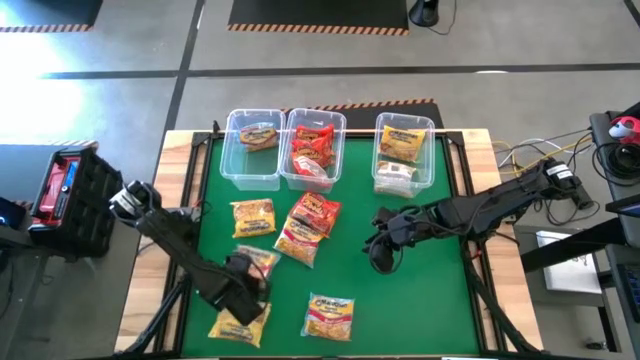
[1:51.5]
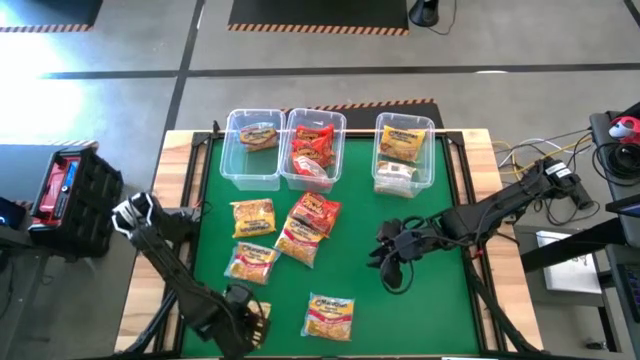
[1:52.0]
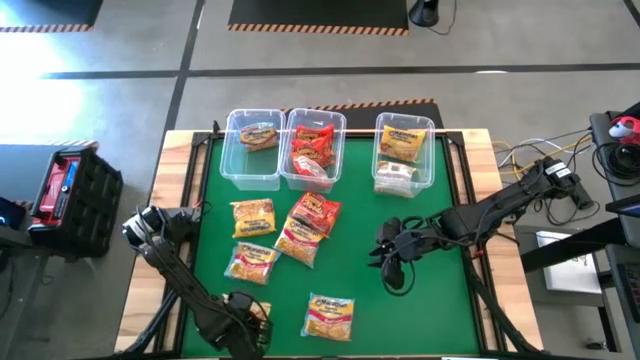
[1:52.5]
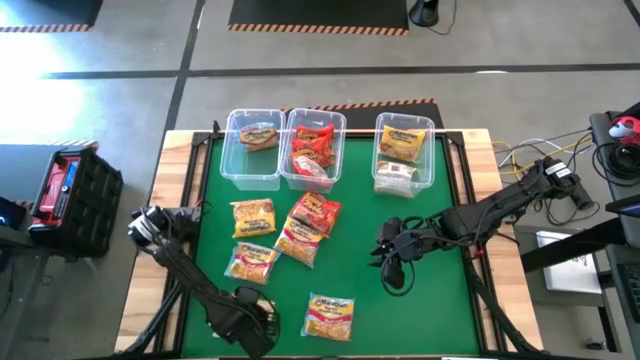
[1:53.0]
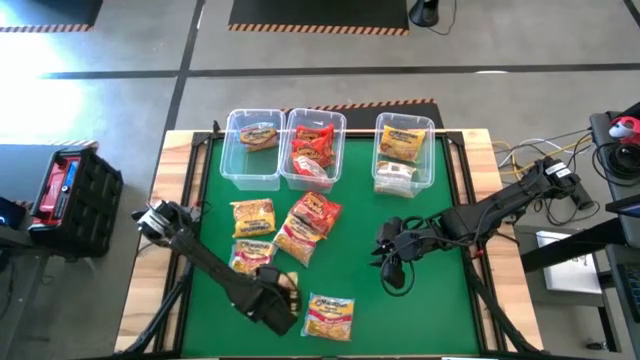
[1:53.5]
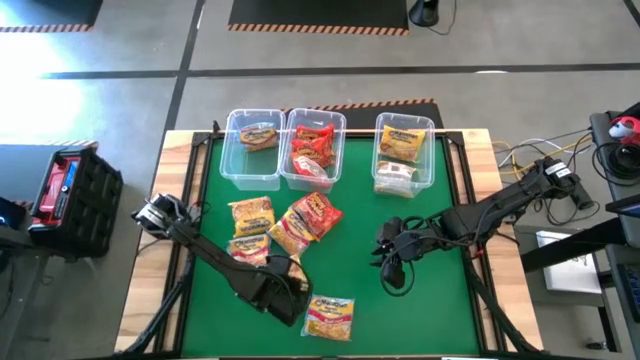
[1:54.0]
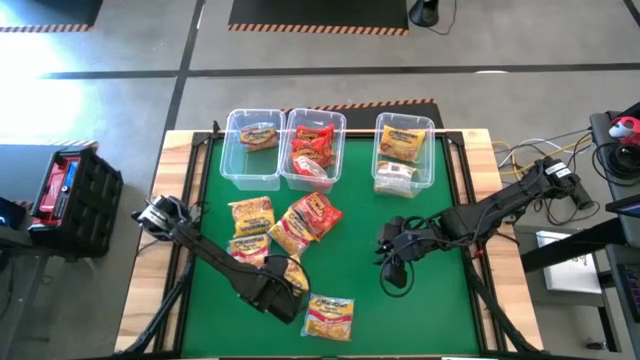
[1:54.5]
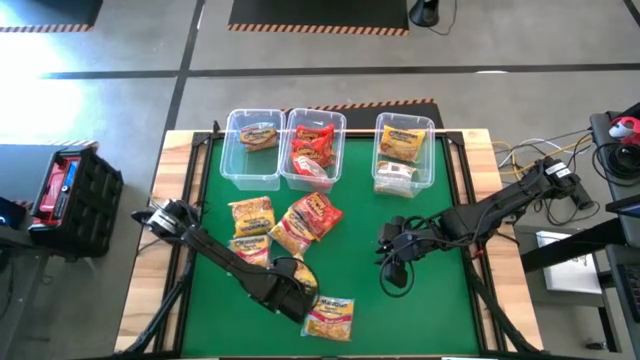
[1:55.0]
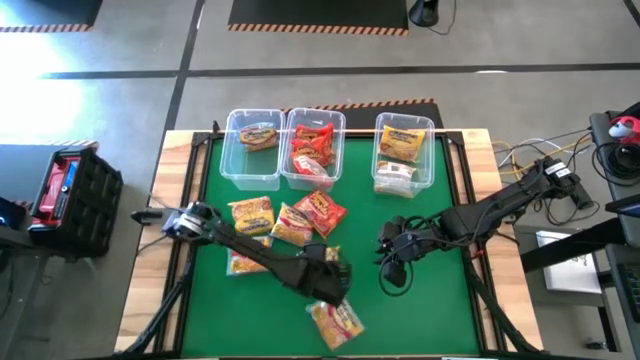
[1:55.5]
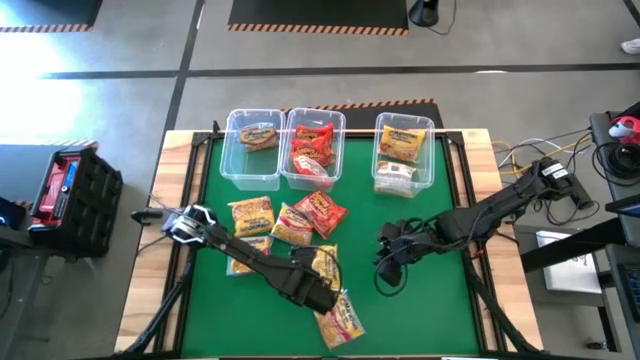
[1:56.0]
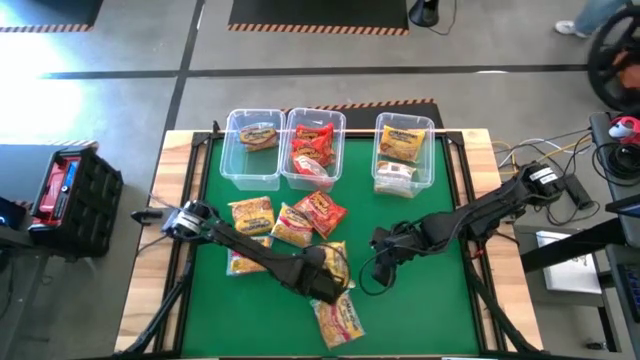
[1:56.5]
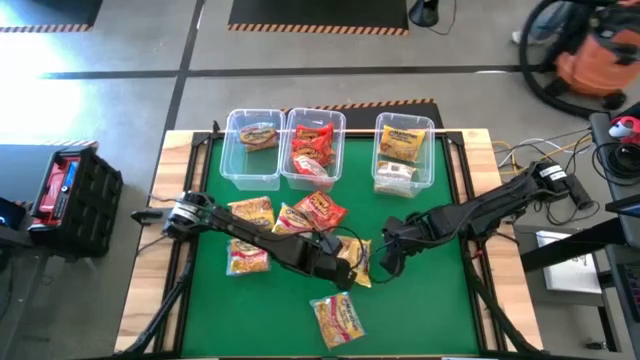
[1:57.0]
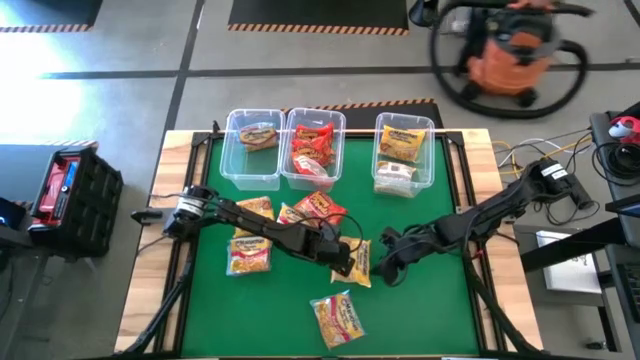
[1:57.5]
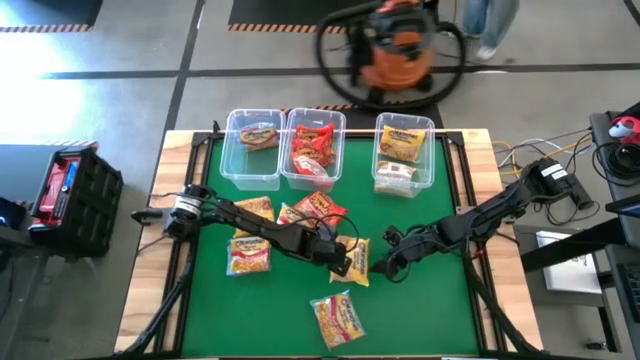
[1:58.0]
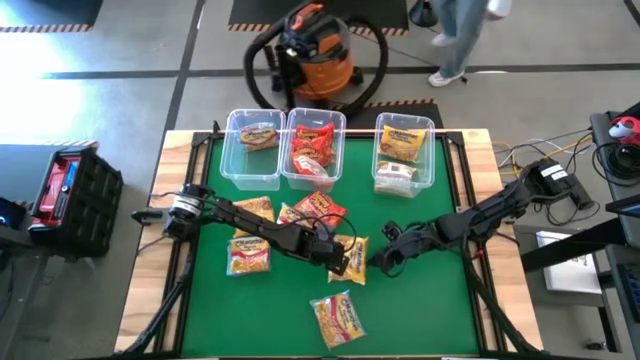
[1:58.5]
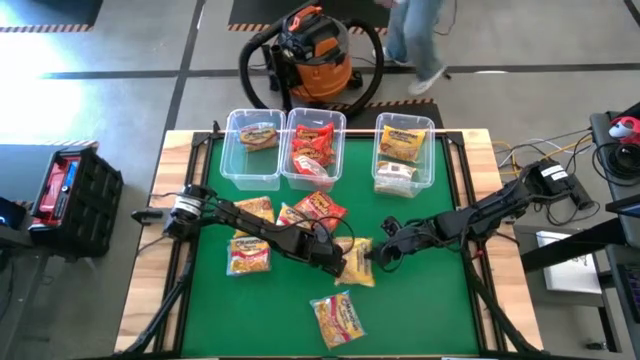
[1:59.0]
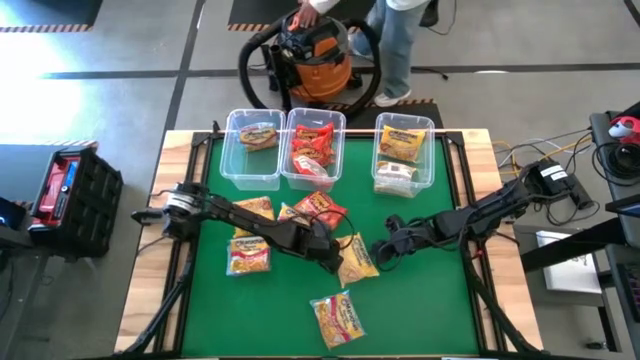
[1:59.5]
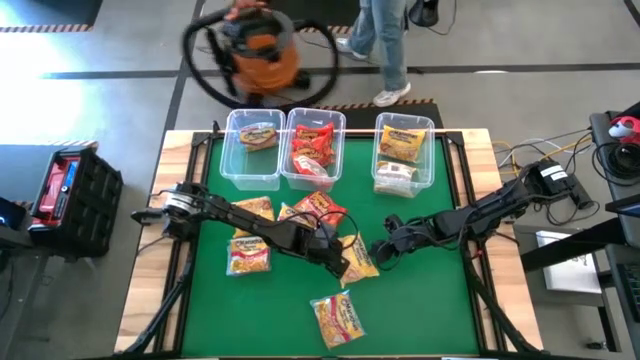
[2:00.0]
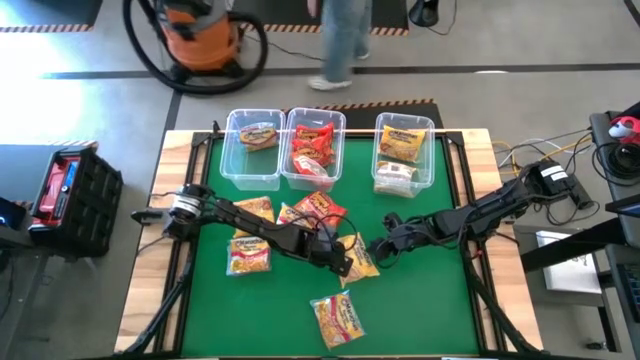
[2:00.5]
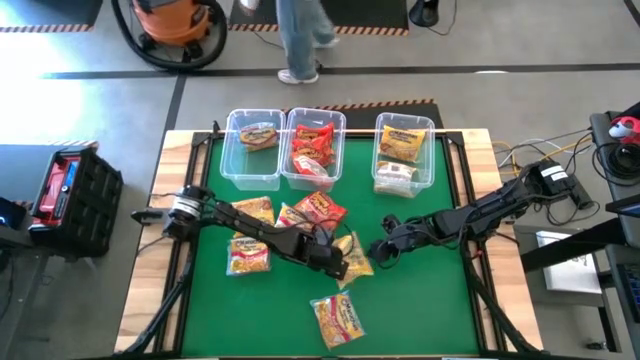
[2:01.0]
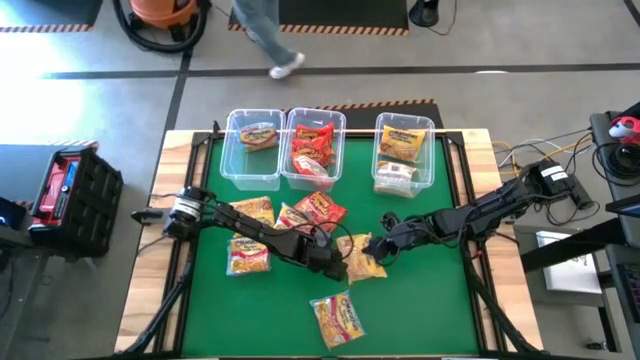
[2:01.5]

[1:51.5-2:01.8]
Task: Sort Maruchan noodles
Put the bottom yellow noodle pack into the top right transparent bin

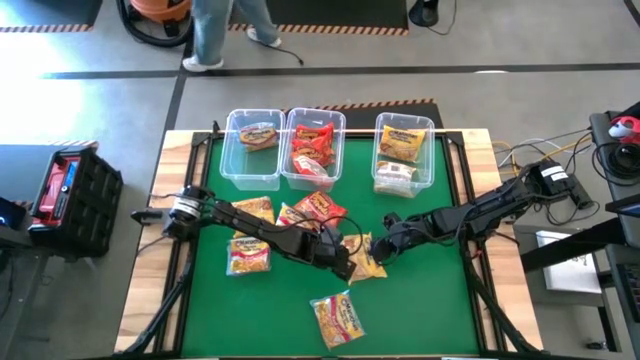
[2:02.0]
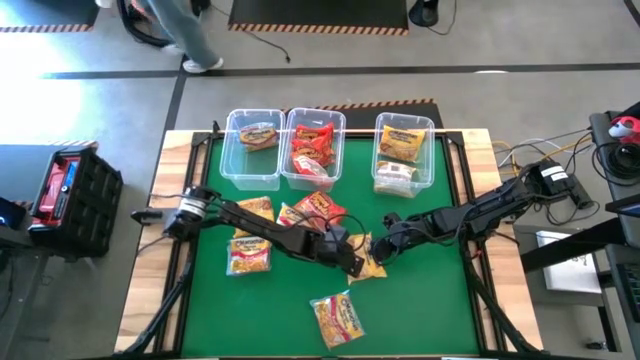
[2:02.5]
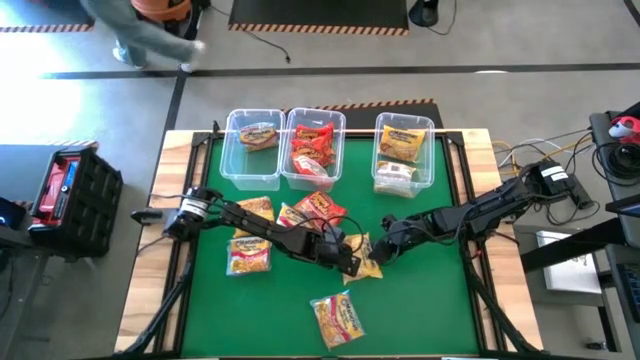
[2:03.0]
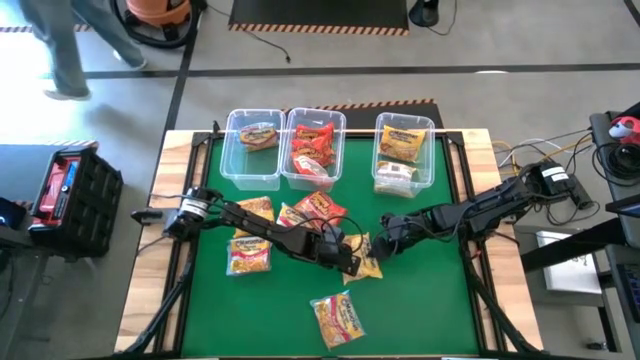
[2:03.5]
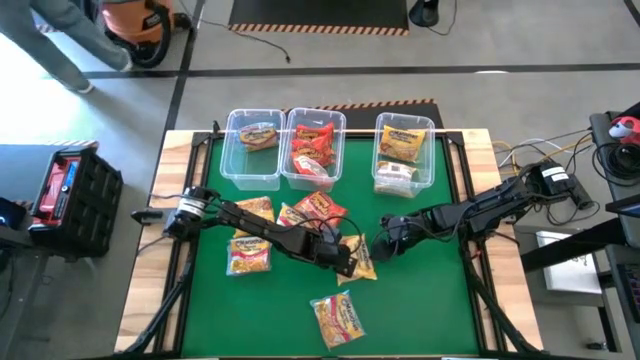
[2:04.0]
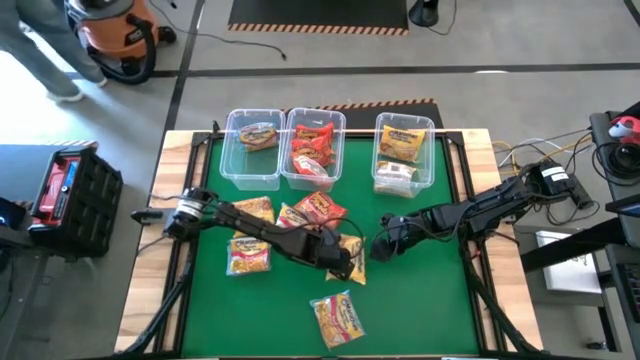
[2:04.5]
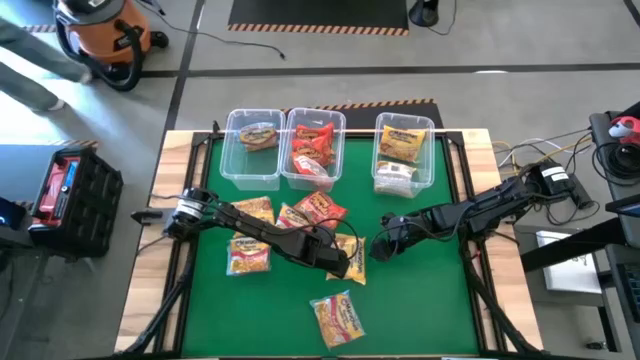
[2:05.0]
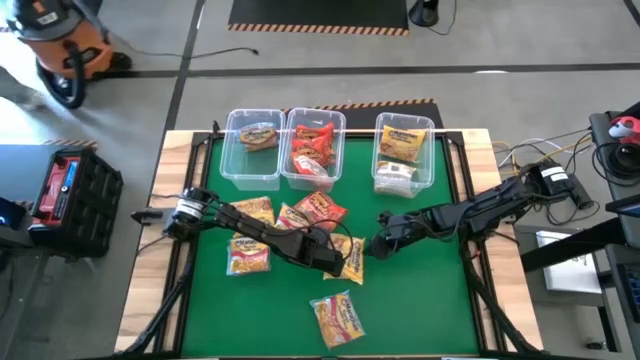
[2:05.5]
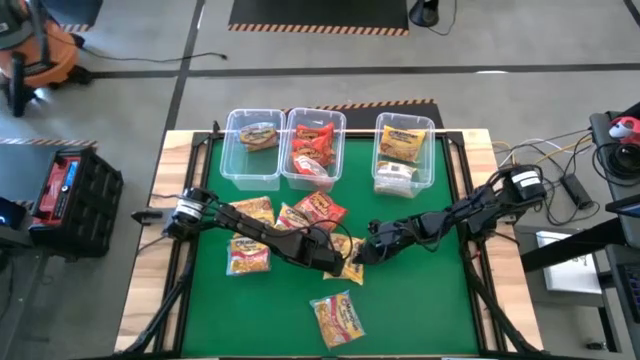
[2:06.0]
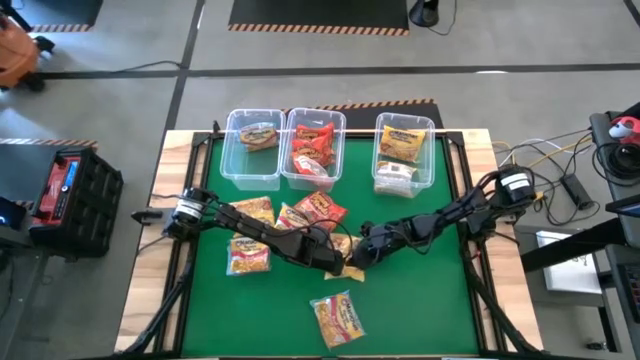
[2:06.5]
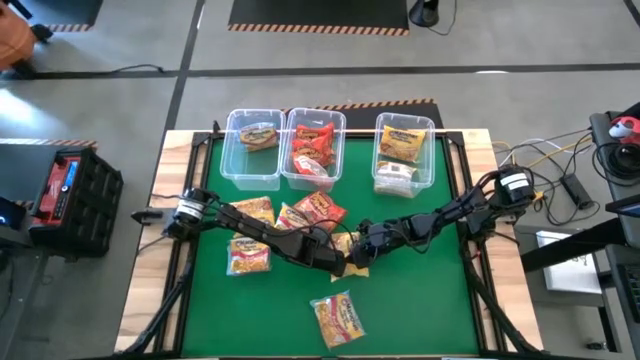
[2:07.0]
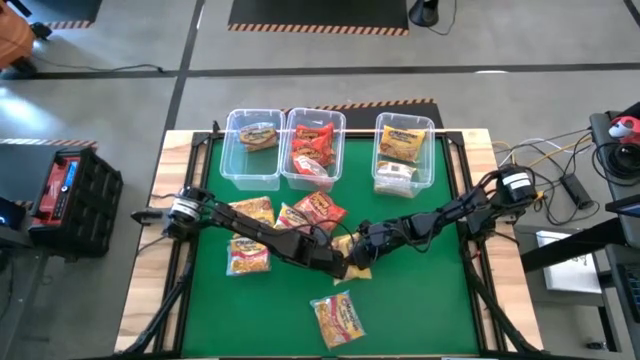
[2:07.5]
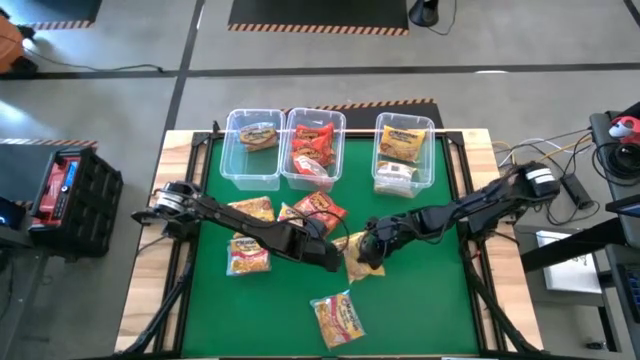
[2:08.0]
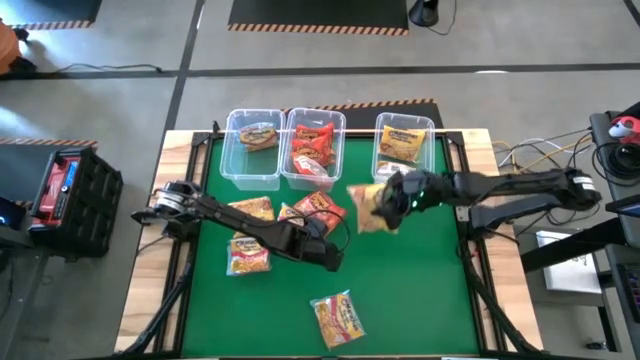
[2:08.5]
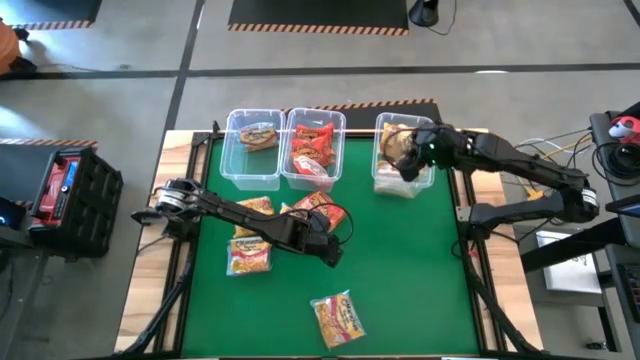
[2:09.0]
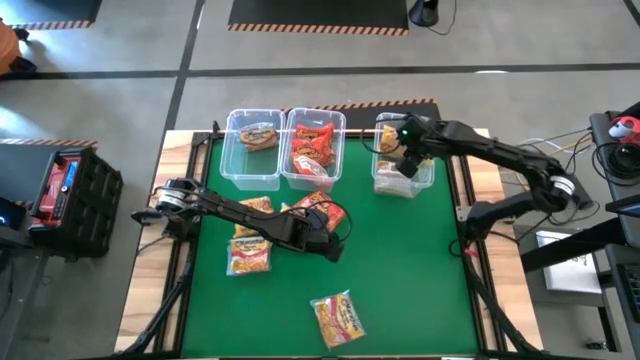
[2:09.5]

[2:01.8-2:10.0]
Put the bottom yellow noodle pack into the top right transparent bin

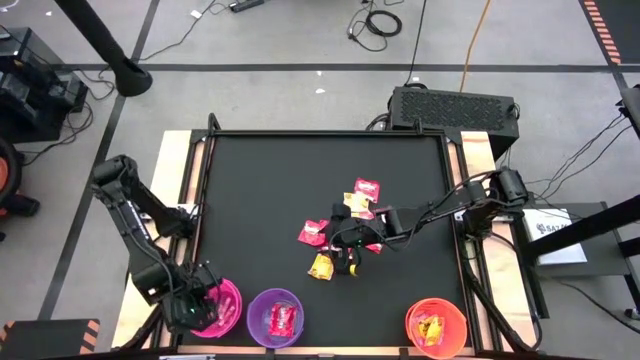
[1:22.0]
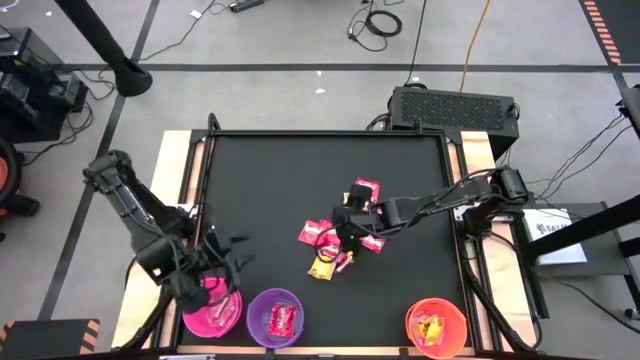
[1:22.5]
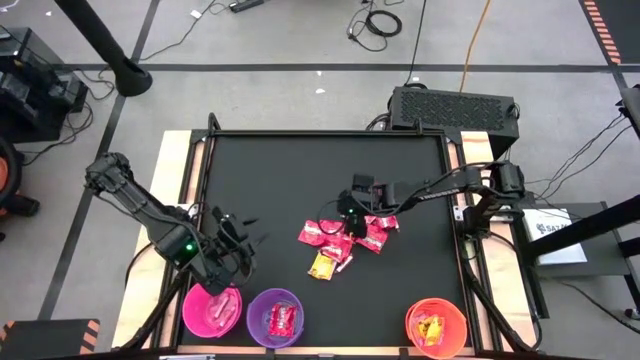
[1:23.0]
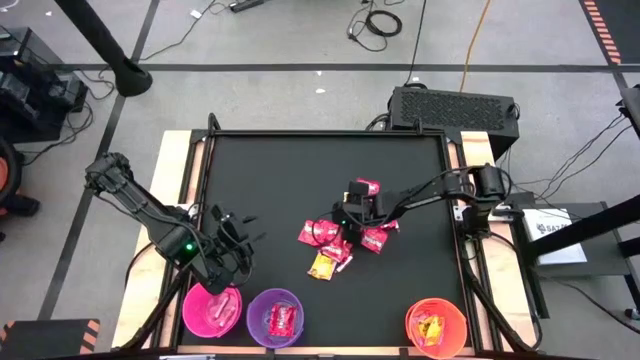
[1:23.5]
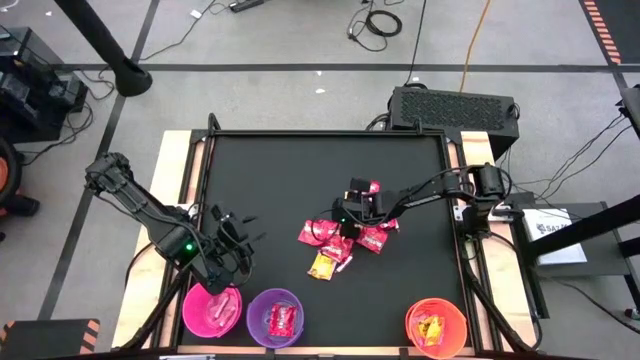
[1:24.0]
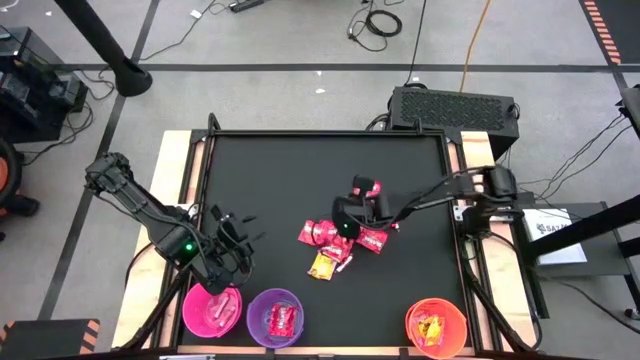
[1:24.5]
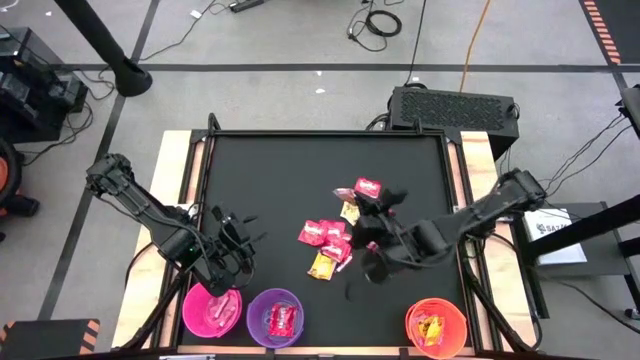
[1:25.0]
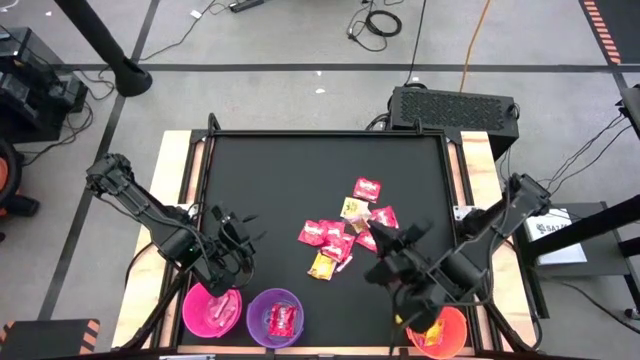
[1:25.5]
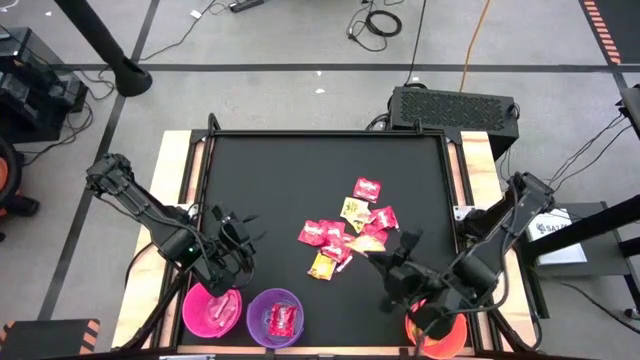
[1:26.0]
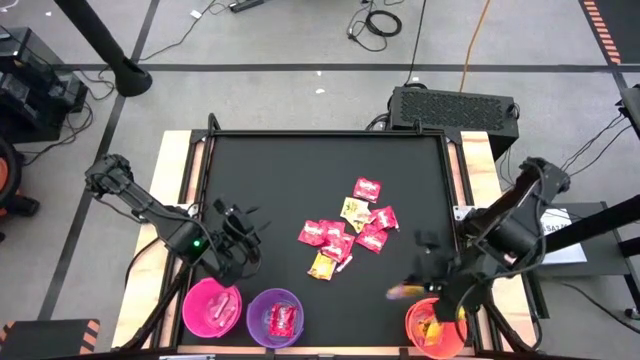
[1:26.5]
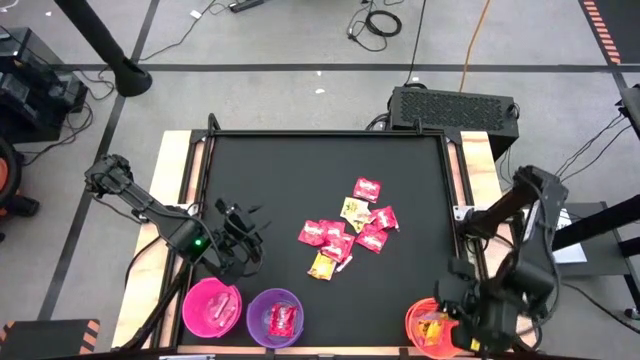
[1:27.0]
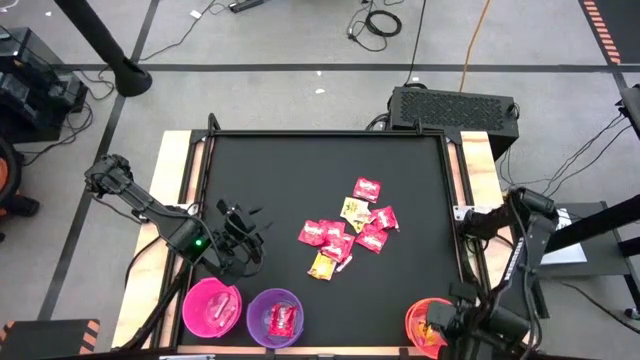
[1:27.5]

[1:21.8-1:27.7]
Task: Sort candy by brand, put in halloween buckets
Put the yellow candy into the orange bucket
